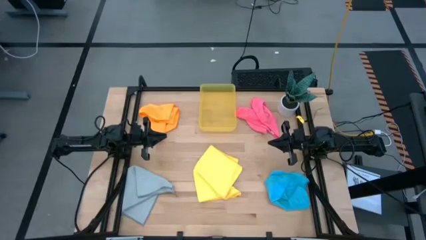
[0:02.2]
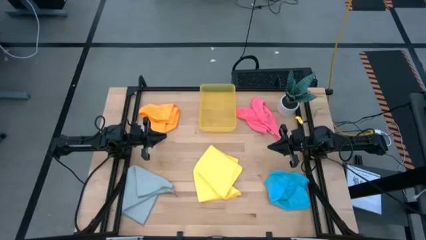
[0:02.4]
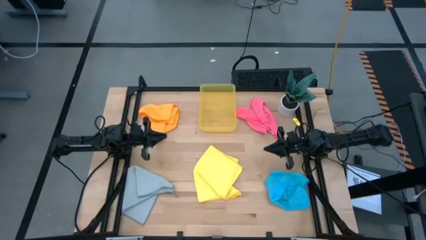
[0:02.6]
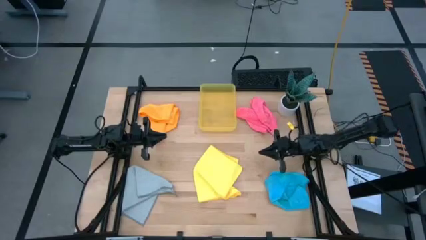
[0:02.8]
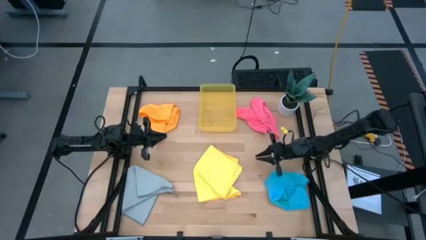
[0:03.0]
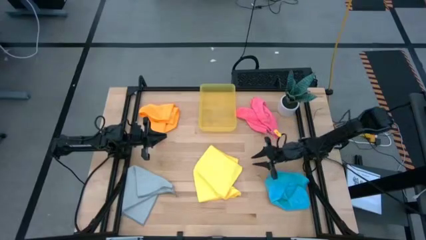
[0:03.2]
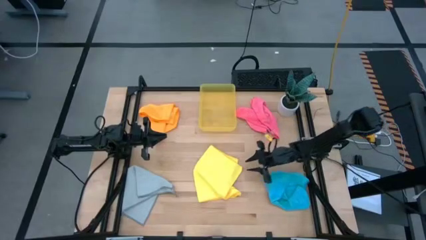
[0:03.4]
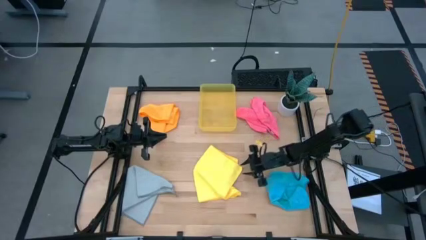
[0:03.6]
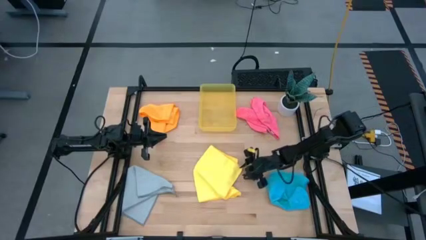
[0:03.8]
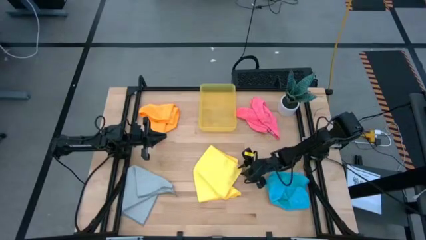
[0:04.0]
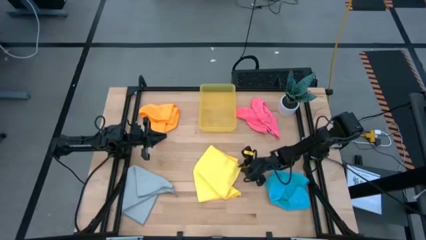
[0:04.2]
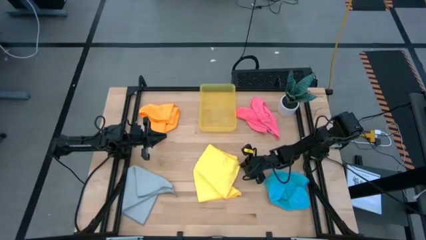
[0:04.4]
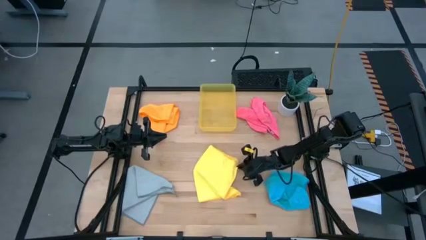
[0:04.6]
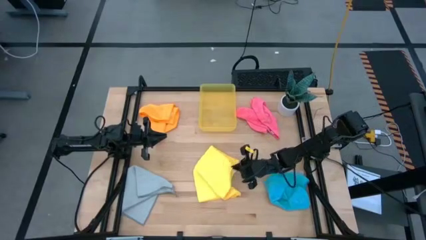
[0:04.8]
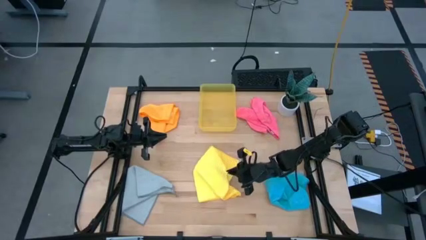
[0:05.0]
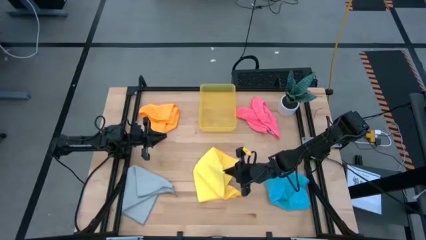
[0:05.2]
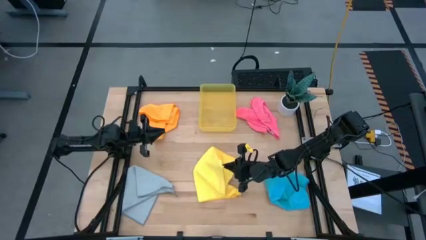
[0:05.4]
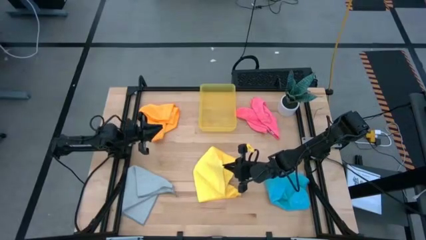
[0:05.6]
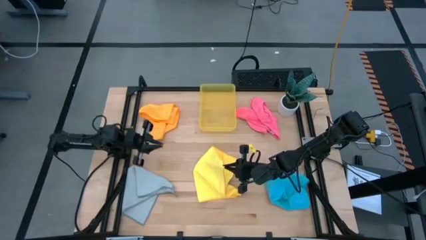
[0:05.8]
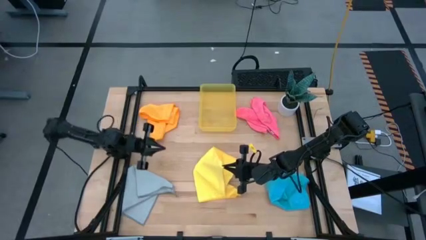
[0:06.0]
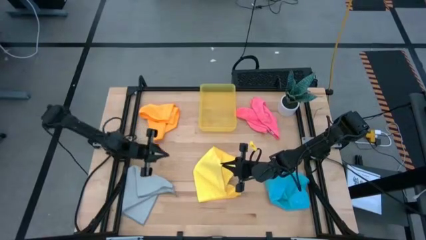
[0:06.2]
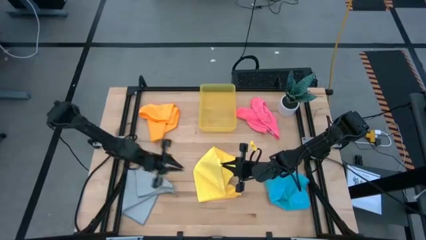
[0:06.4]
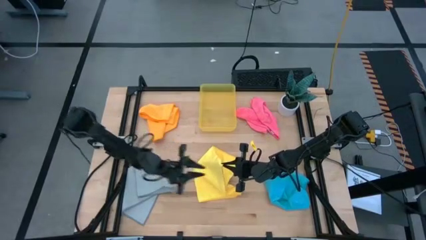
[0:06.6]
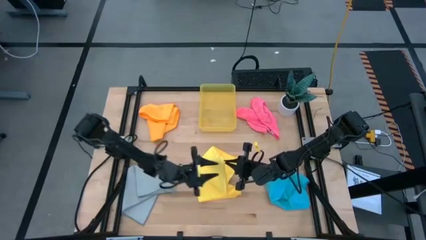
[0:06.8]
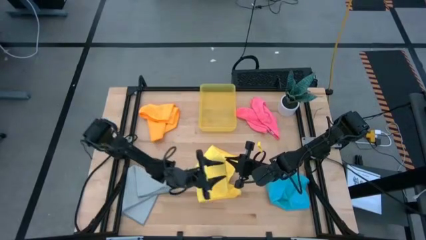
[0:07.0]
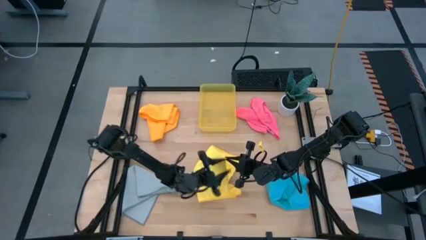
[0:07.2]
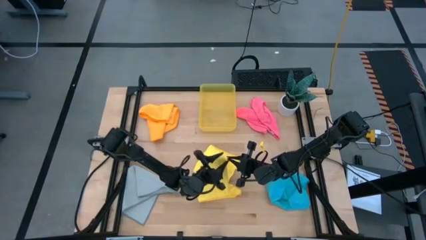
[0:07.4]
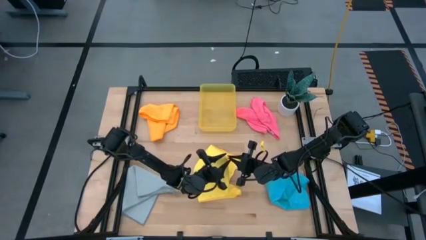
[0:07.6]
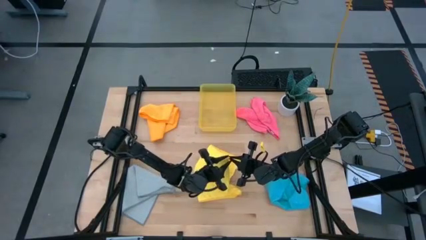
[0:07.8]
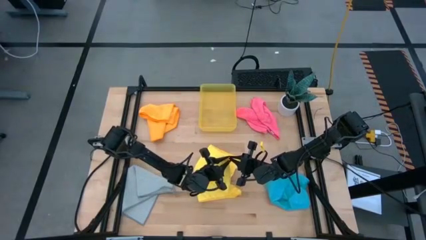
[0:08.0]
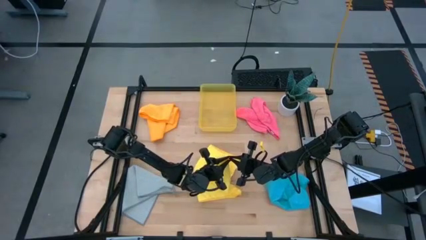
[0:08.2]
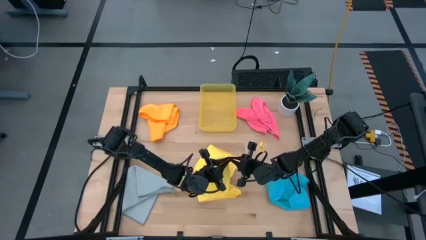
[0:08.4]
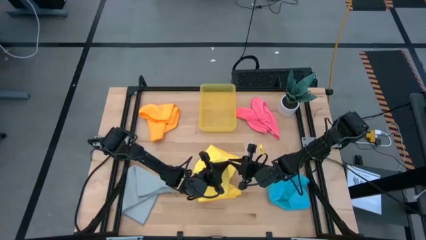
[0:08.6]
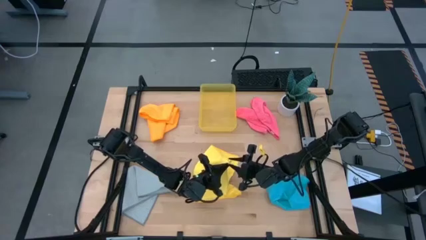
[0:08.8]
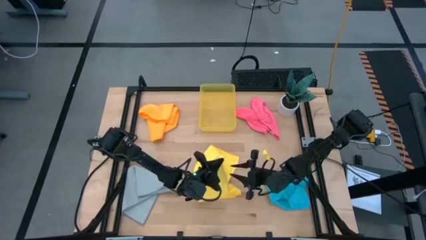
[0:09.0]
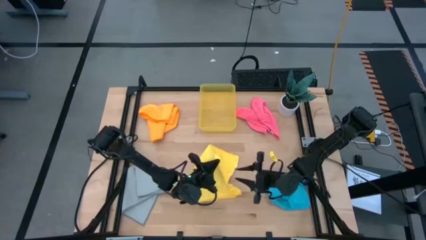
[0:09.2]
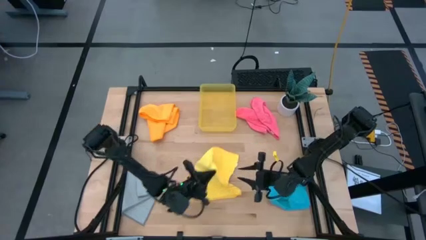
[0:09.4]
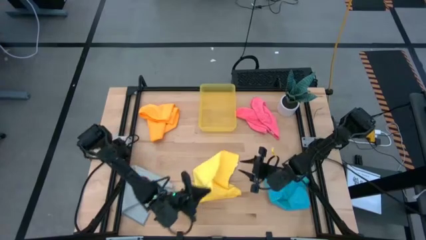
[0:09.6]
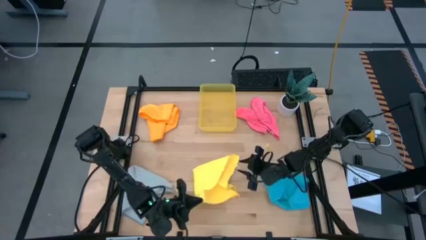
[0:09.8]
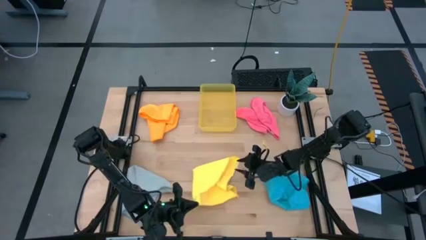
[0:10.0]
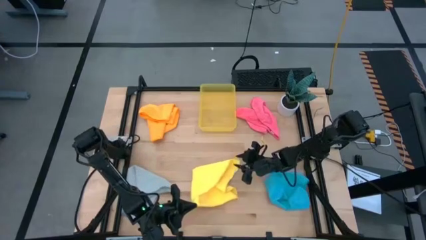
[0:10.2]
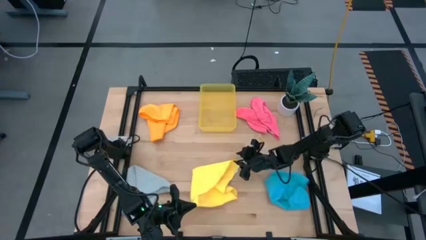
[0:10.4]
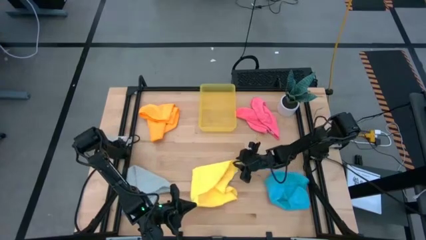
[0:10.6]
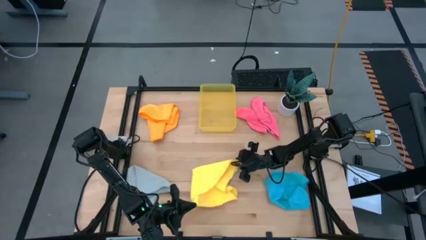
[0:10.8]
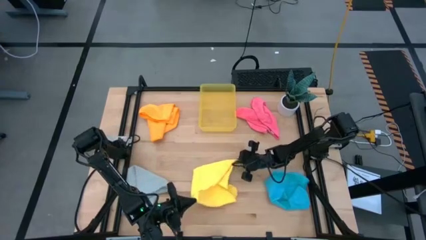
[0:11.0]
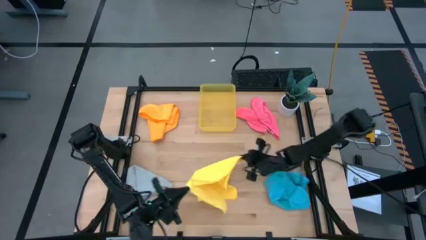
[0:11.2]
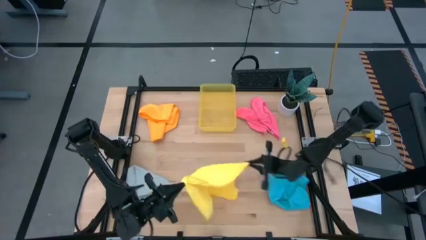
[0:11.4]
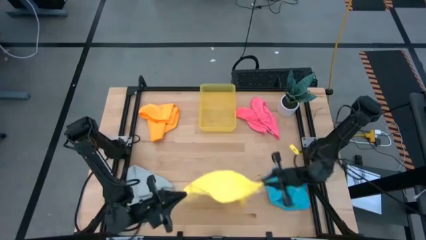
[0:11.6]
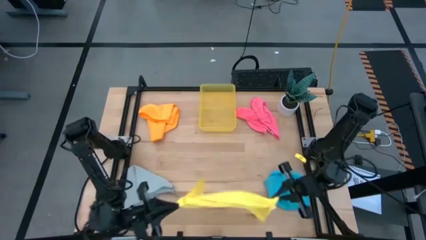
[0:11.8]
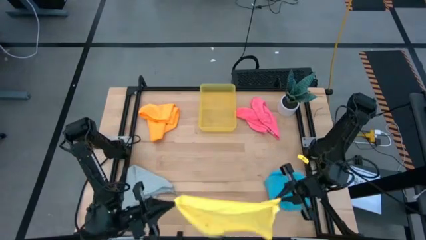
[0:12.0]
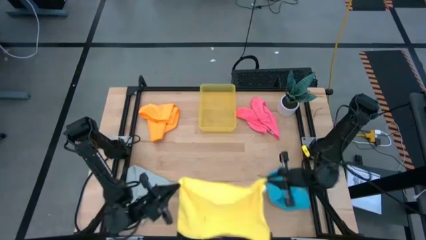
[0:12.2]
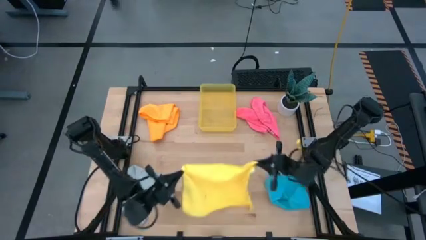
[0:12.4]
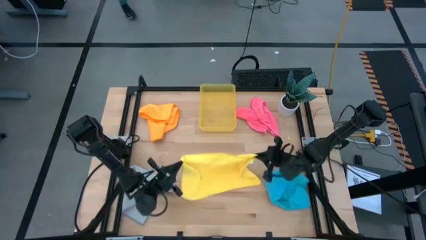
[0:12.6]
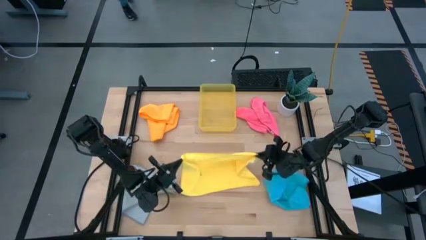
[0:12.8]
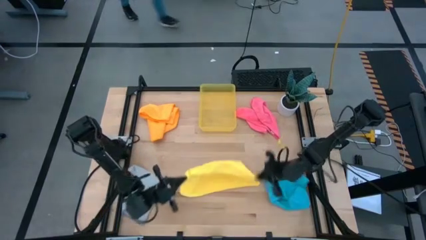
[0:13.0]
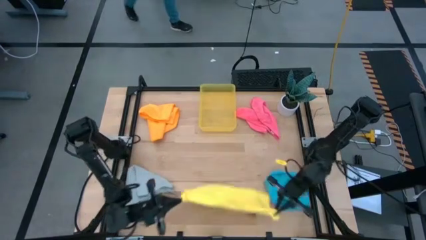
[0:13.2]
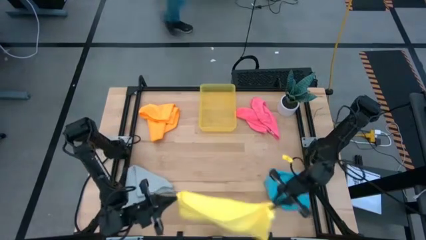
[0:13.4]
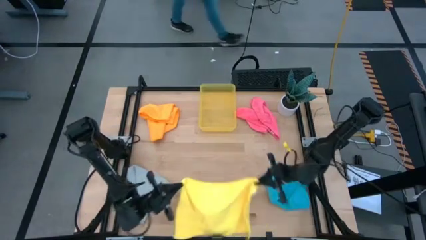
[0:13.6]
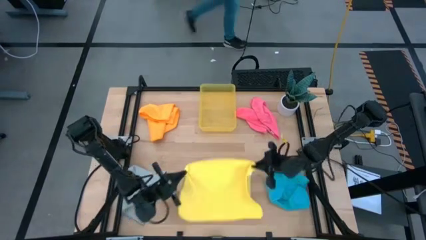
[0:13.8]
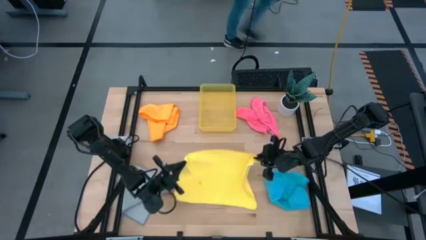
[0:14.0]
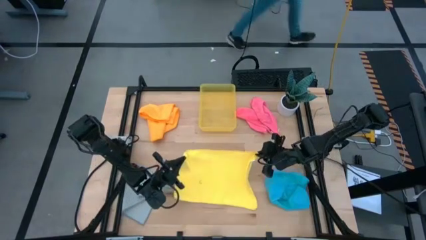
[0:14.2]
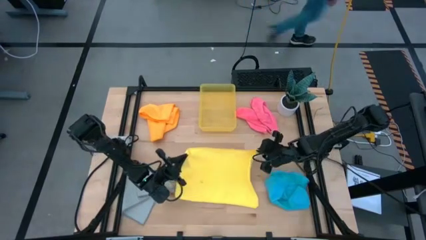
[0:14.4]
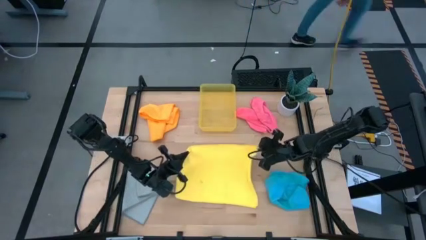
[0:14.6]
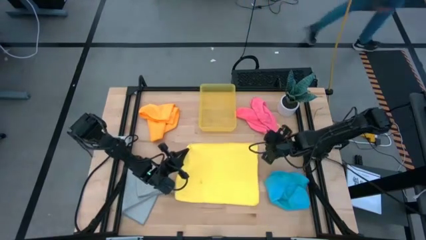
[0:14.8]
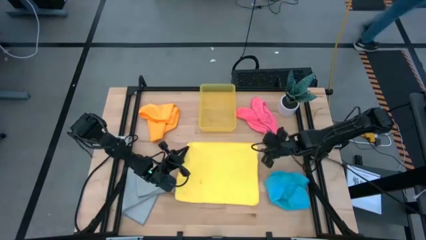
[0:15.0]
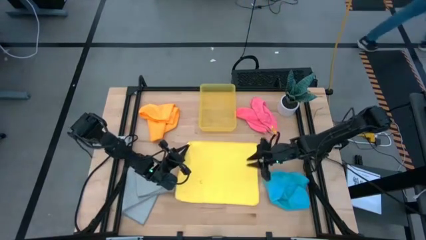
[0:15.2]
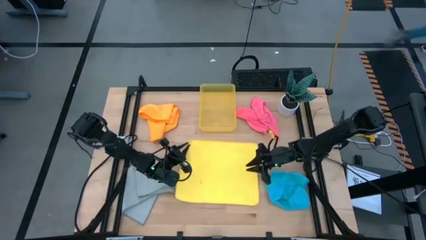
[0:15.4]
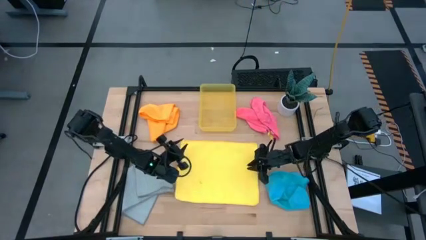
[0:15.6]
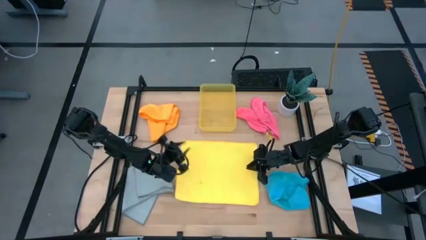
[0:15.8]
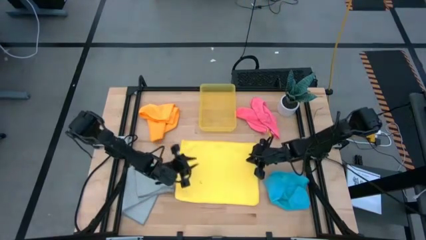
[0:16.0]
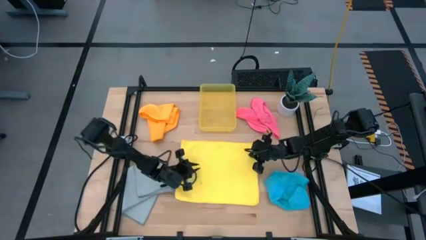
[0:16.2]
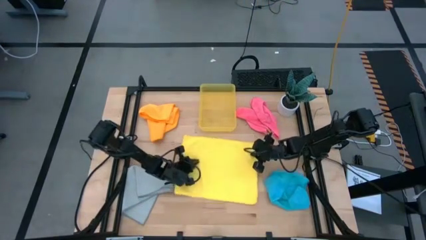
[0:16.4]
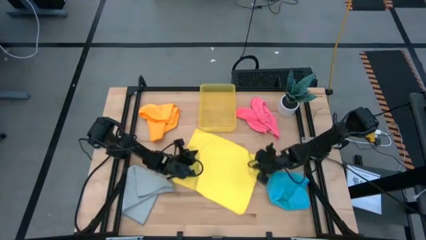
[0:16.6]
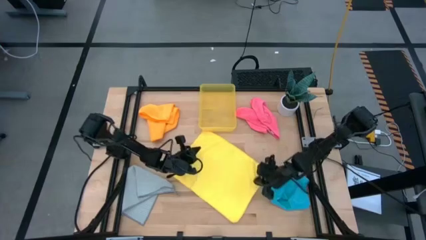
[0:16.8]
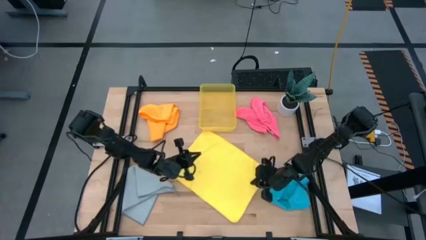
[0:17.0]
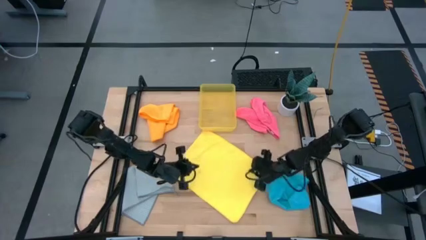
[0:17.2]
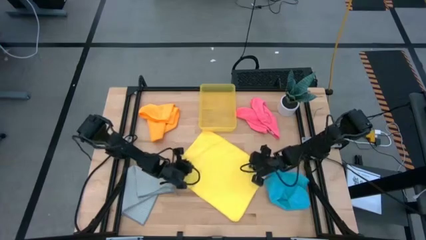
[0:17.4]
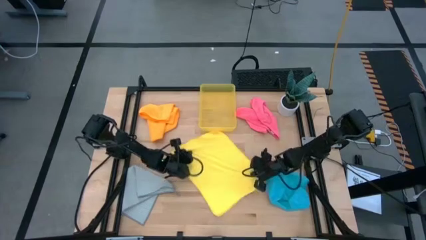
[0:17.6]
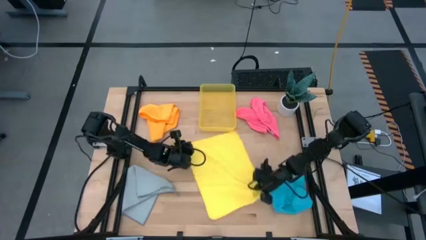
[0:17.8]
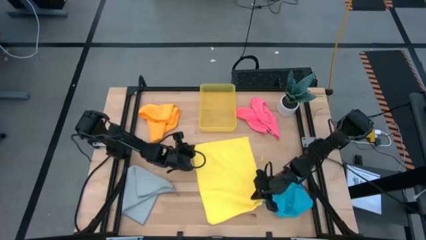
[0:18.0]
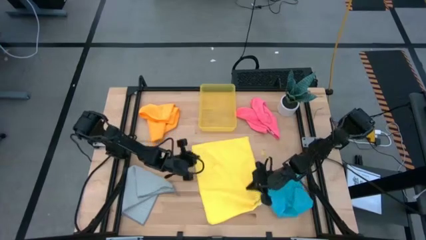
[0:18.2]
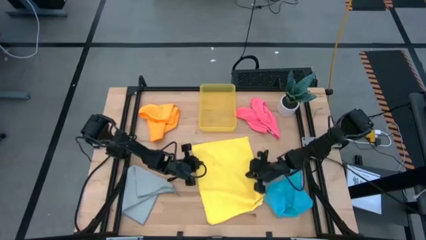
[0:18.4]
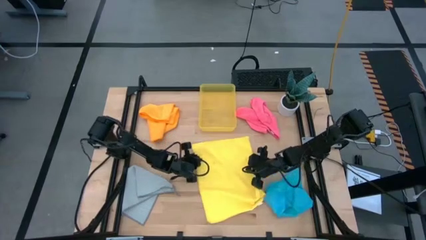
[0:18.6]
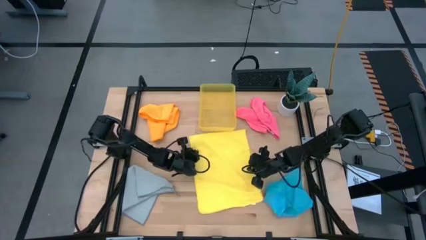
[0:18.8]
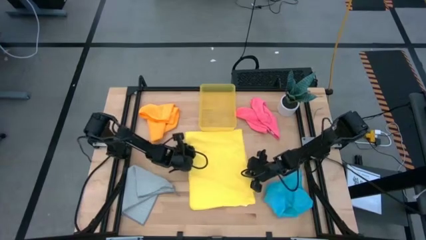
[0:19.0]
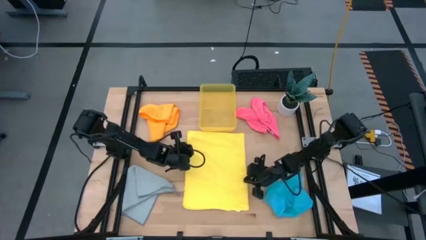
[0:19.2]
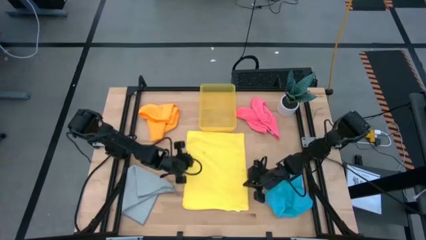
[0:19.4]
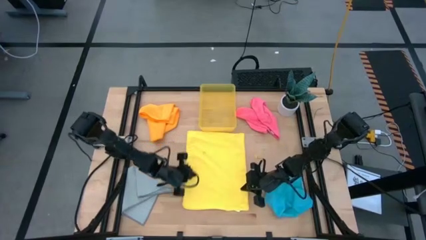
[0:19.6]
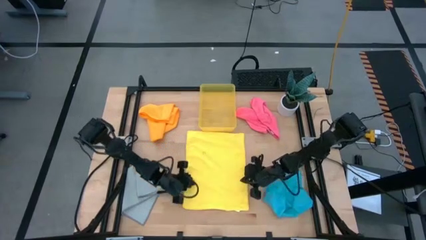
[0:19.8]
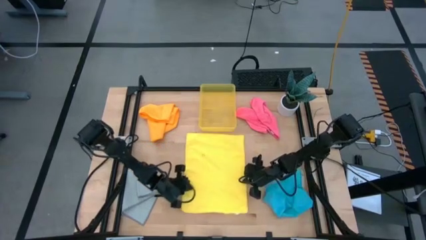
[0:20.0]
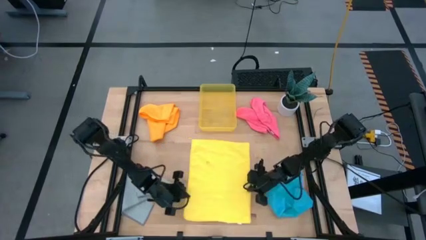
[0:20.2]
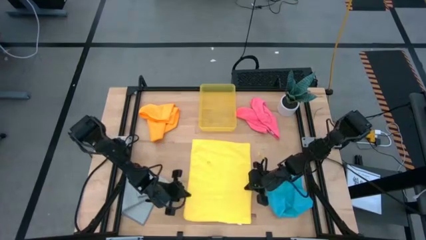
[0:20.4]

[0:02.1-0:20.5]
Task: Fold microfiber towels
Fold the yellow microfiber towel
